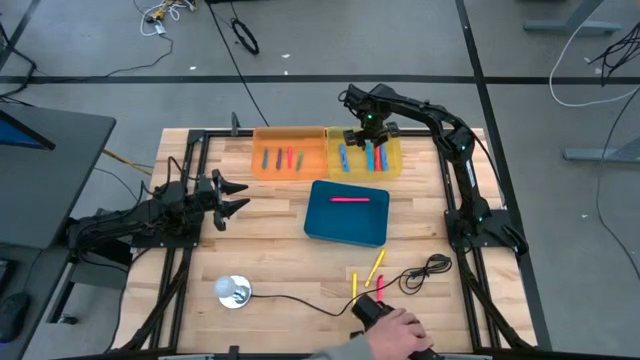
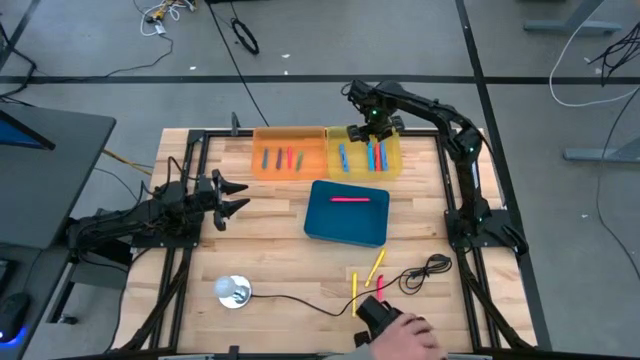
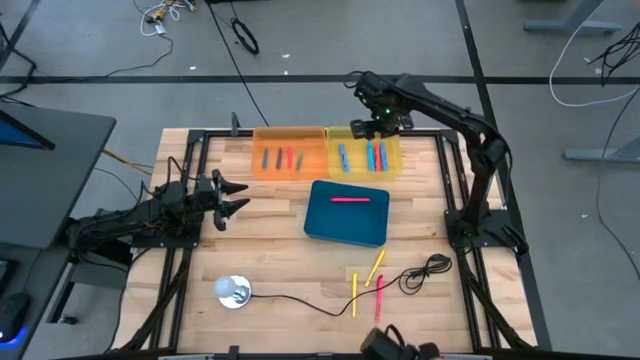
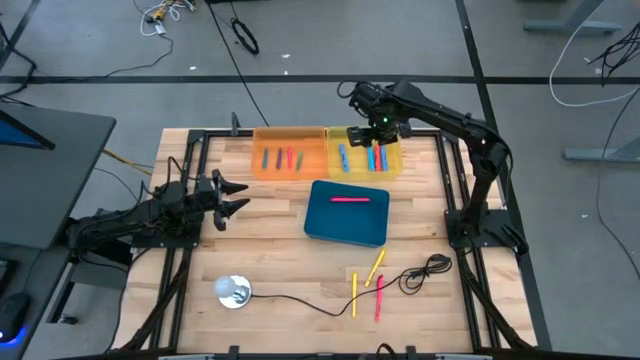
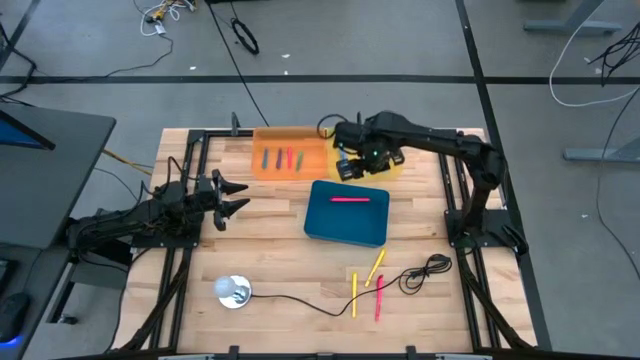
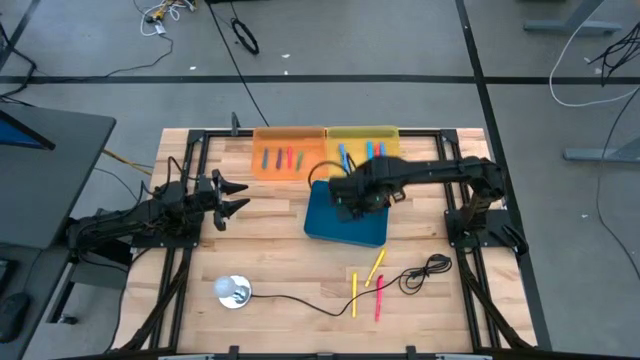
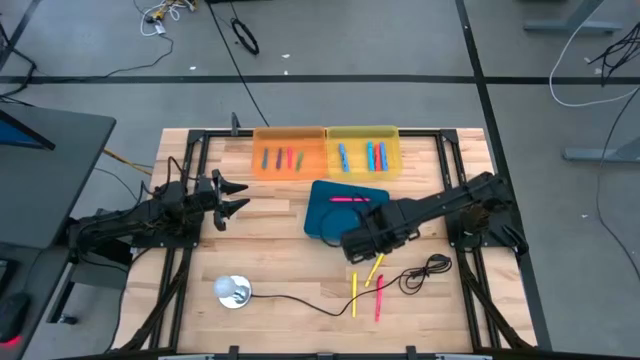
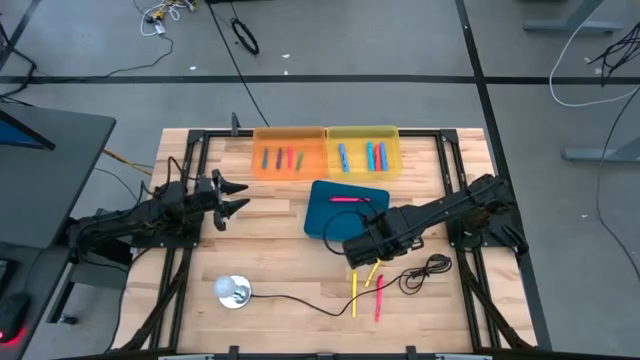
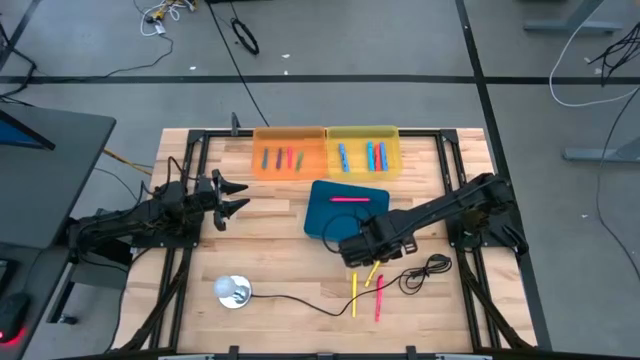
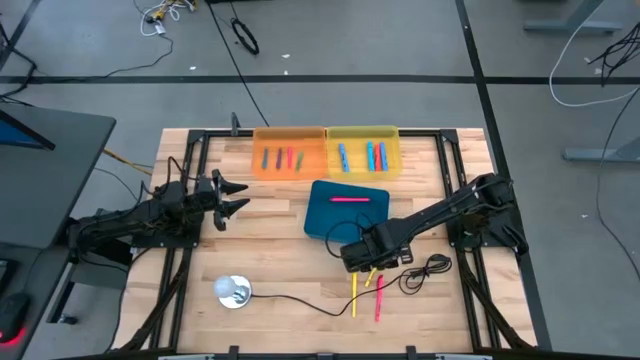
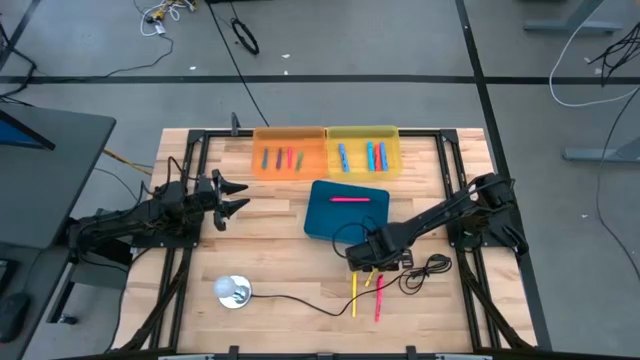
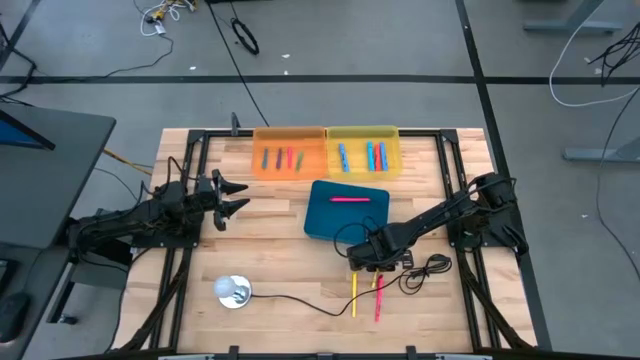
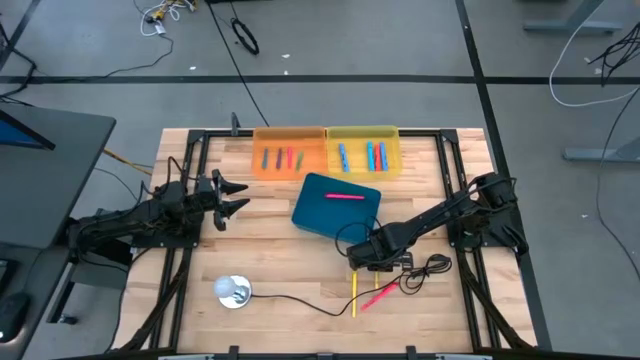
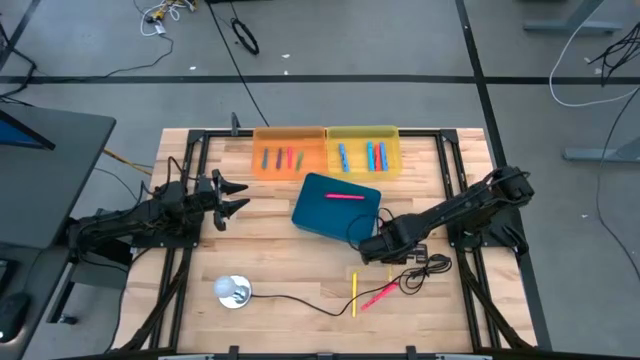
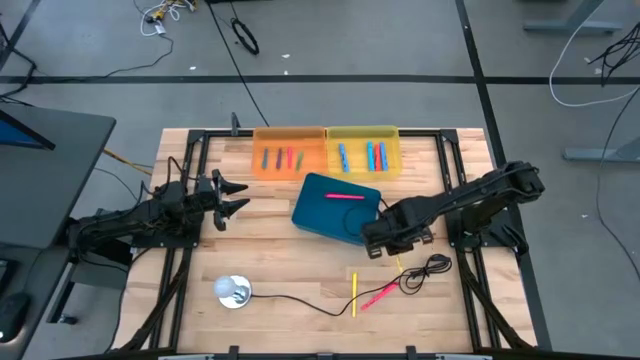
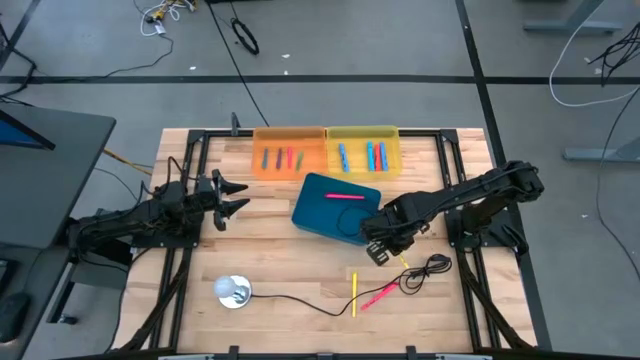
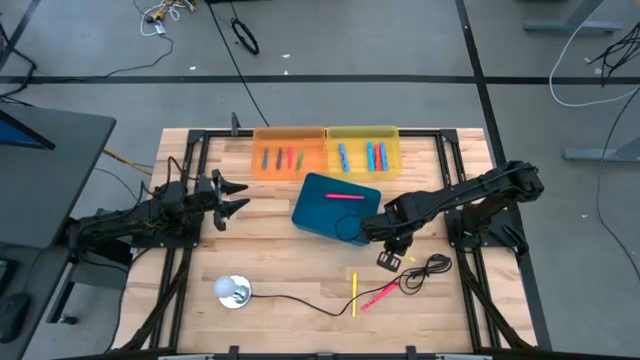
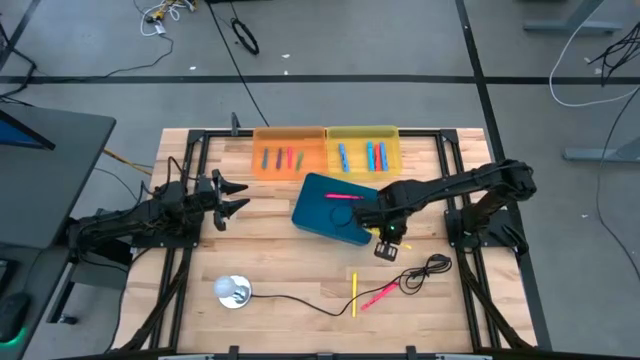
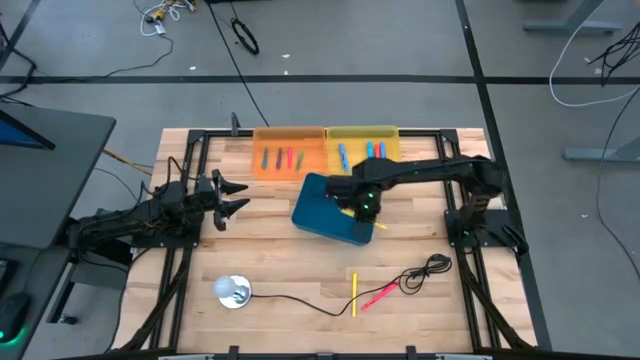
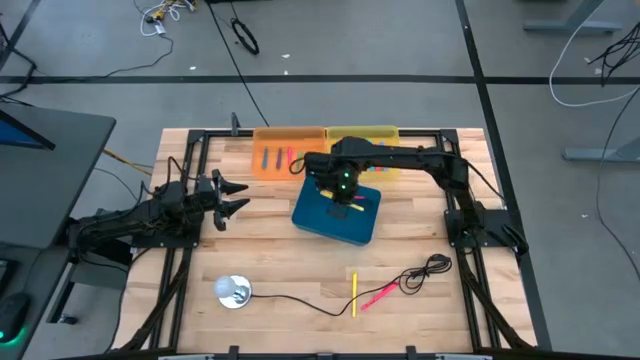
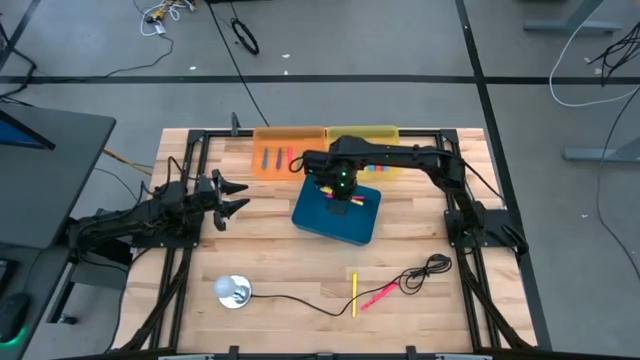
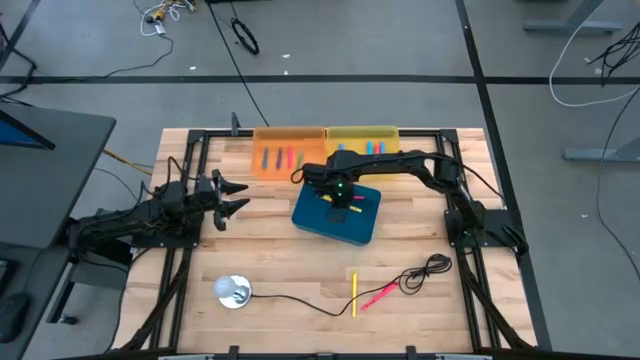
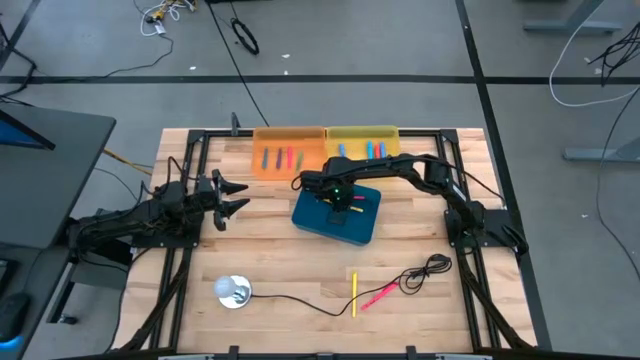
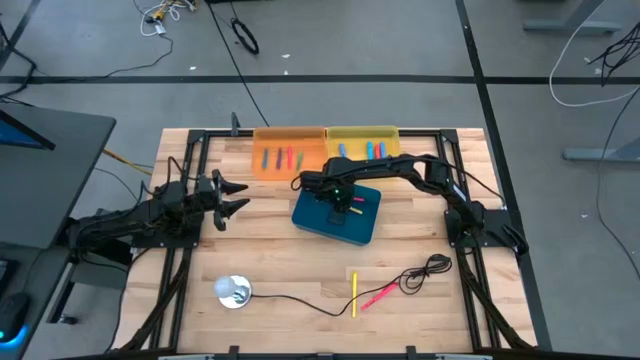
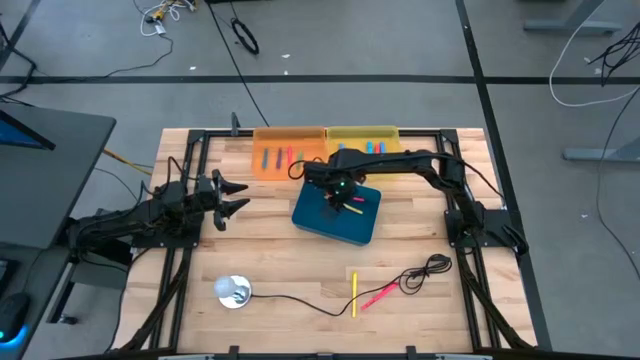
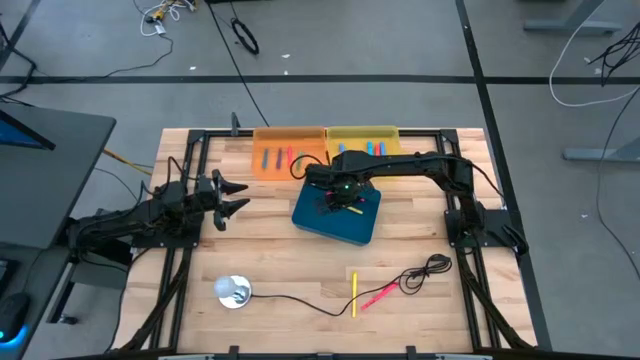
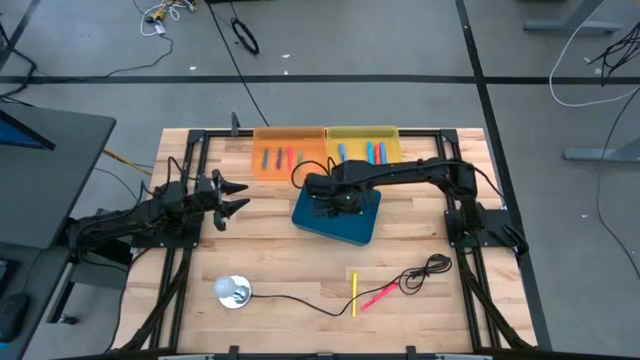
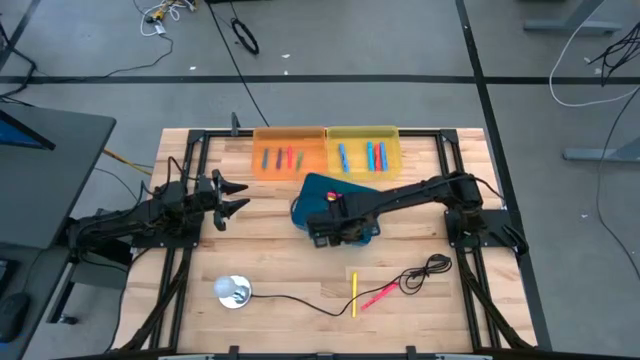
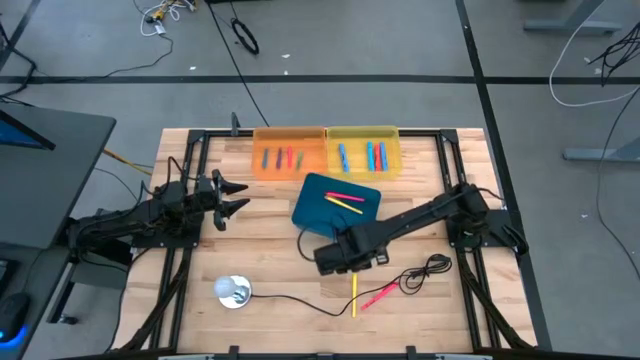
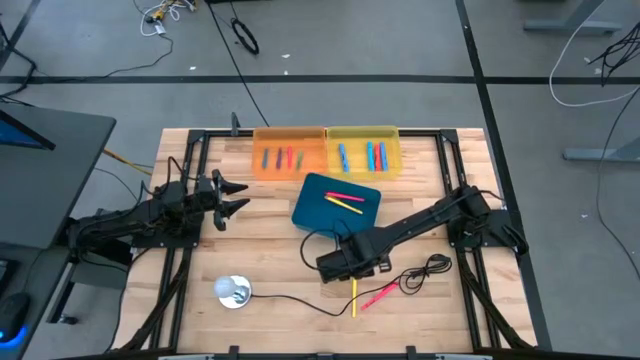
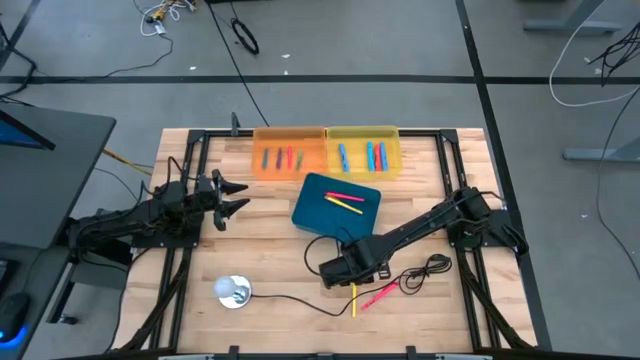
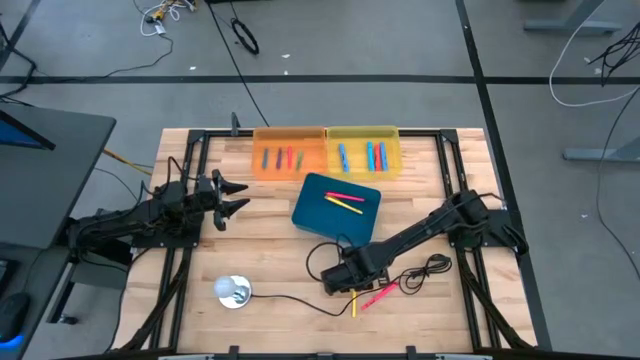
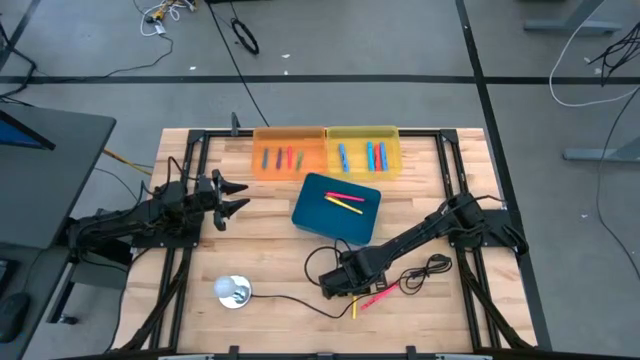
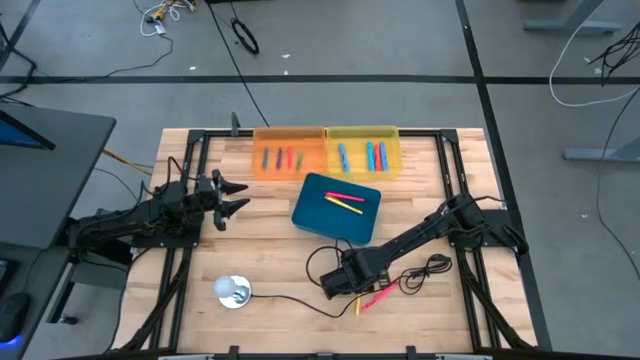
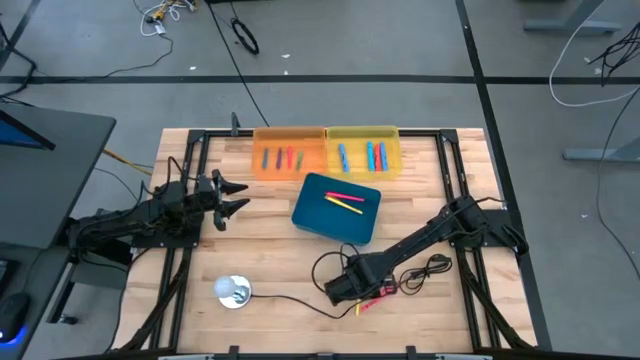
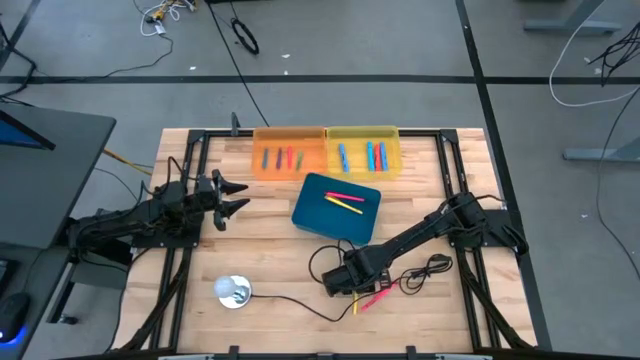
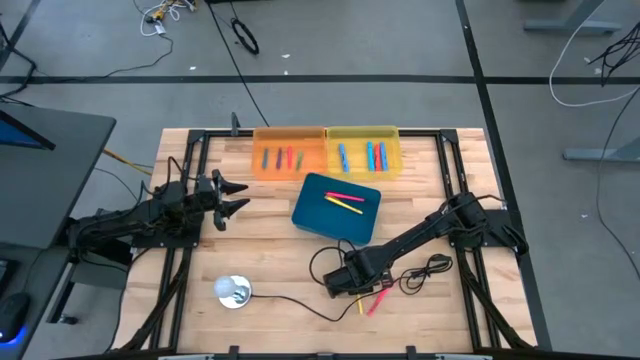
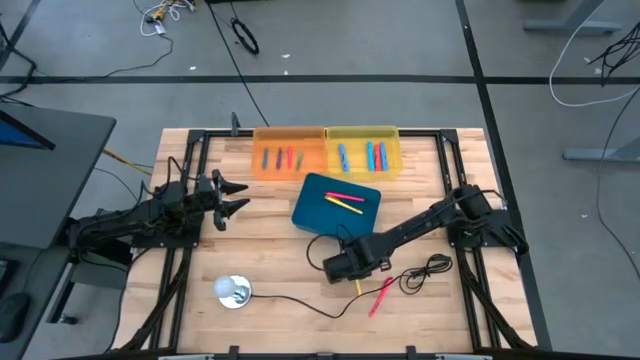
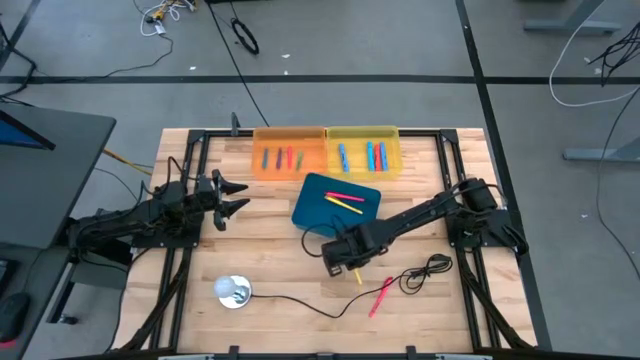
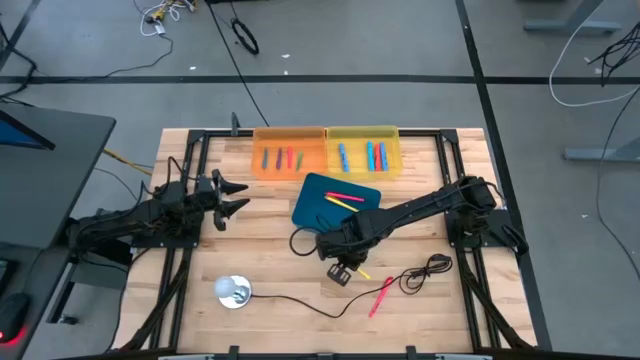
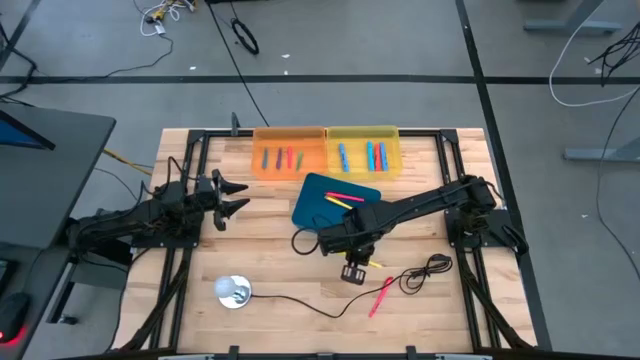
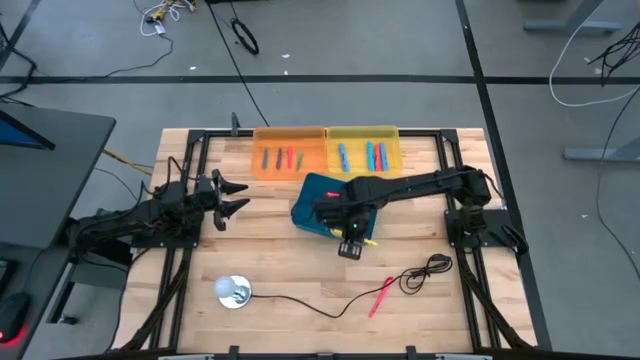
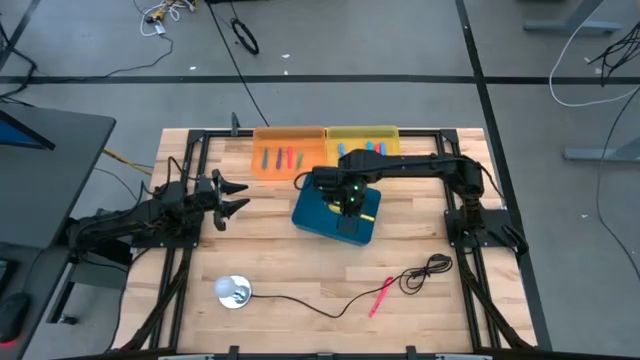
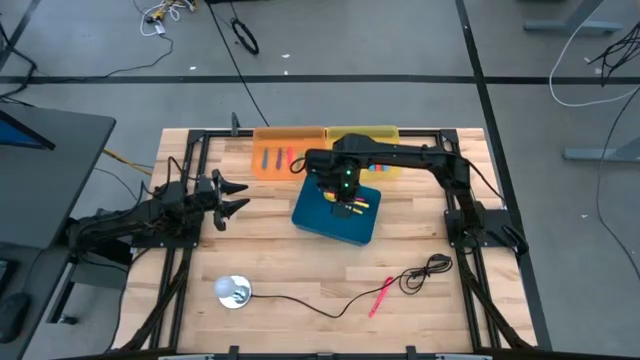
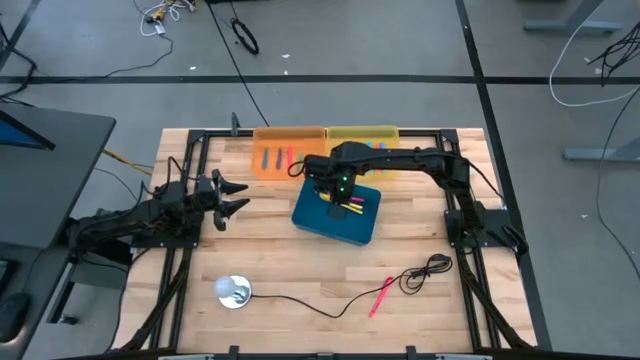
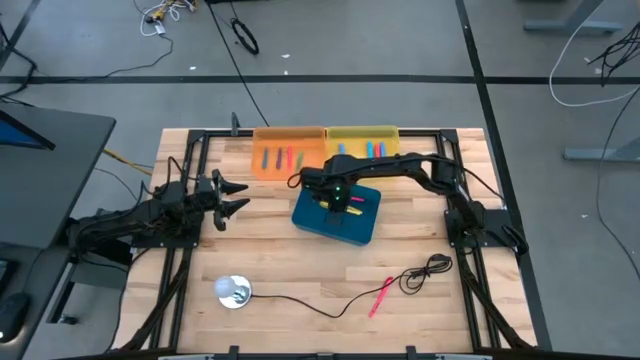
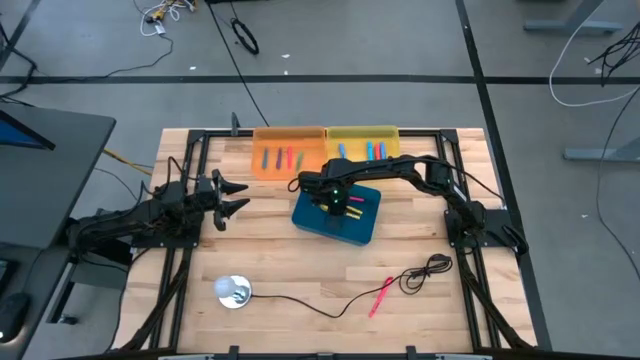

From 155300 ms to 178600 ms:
Task: Pick & Place Markers
Put the yellow highlighter into the blue bin
